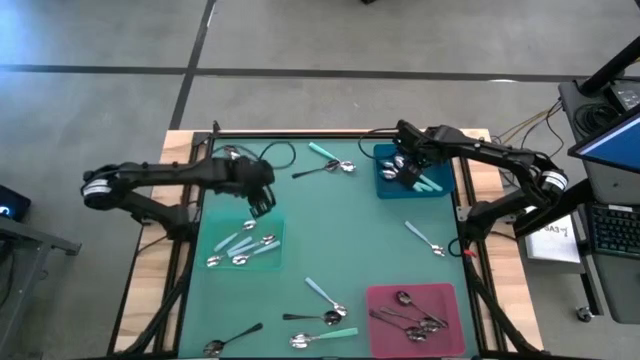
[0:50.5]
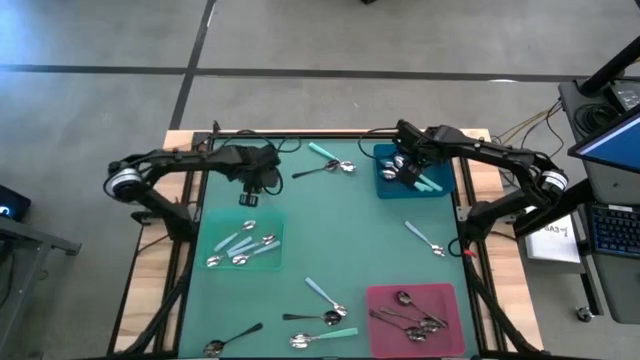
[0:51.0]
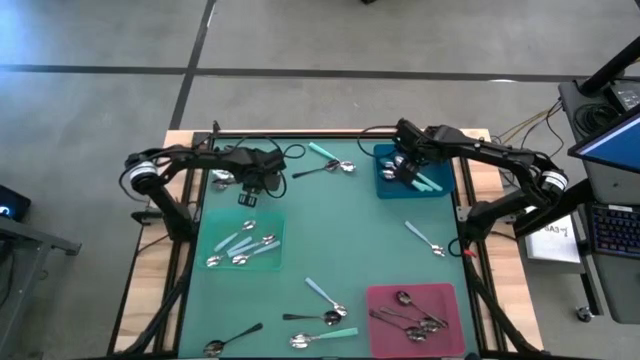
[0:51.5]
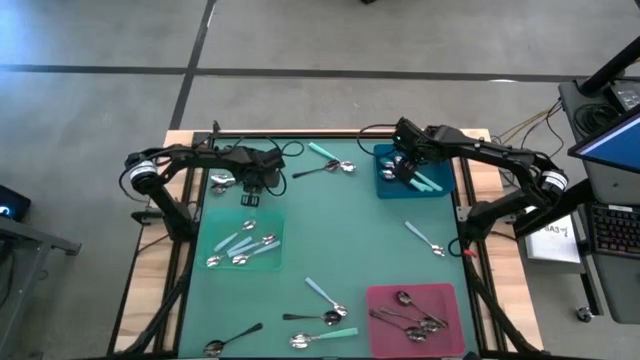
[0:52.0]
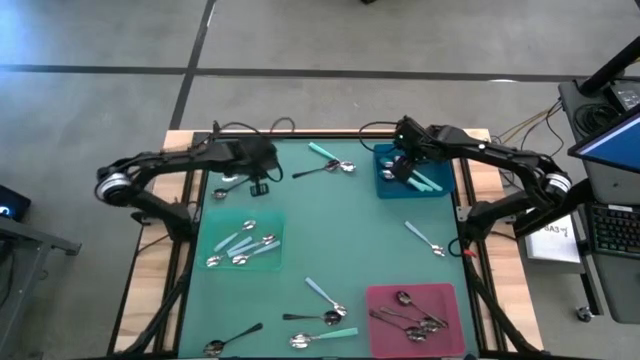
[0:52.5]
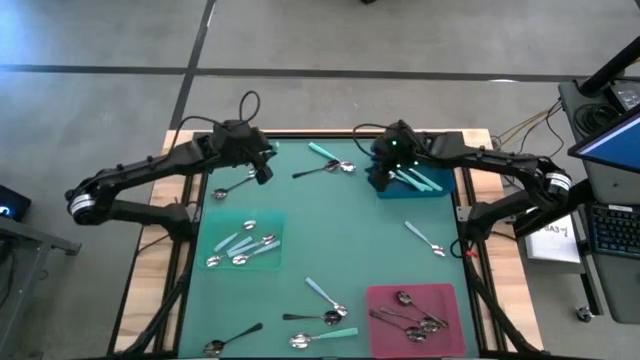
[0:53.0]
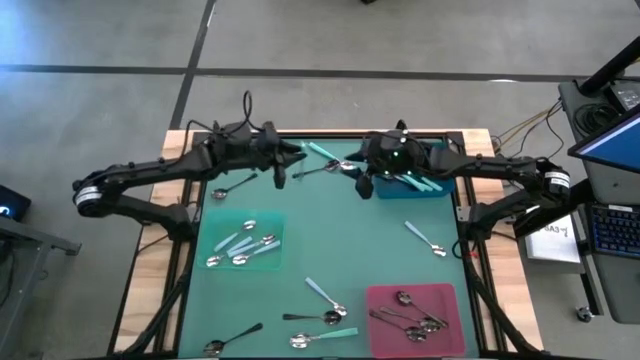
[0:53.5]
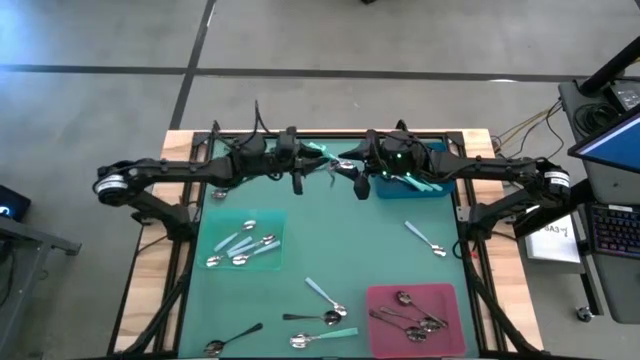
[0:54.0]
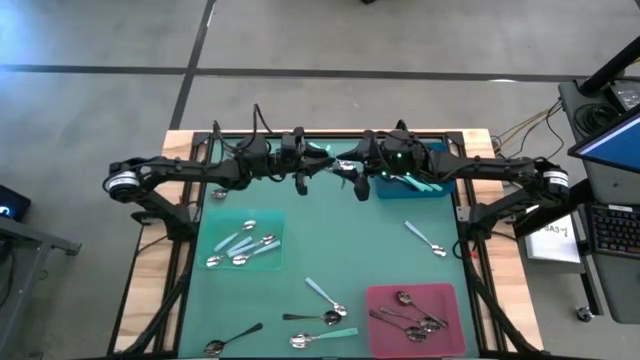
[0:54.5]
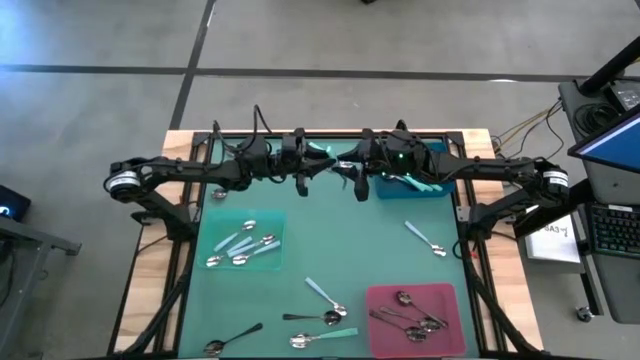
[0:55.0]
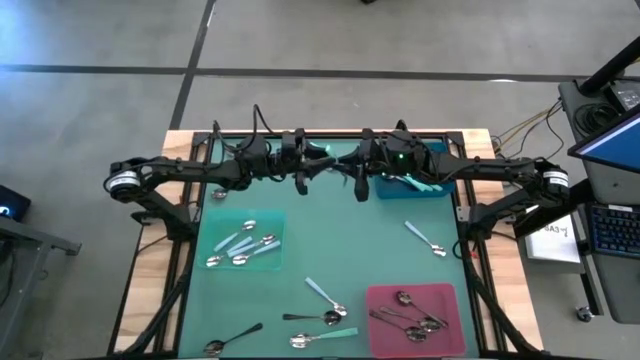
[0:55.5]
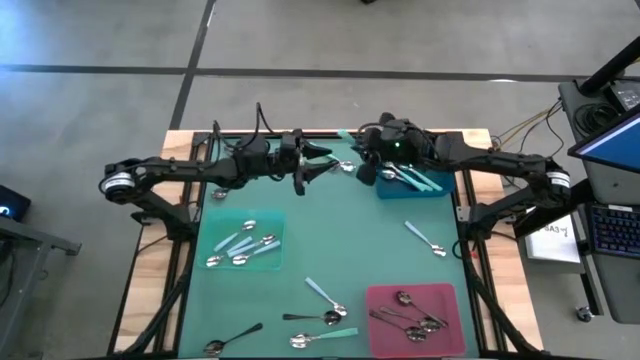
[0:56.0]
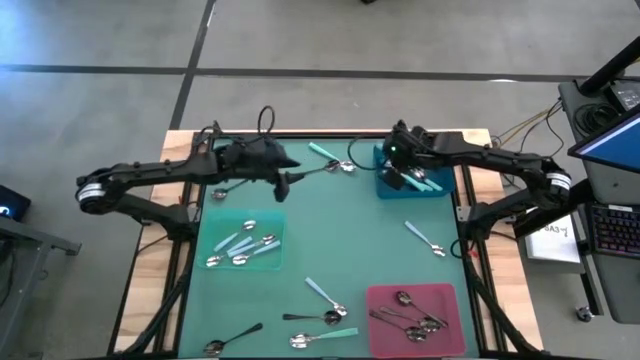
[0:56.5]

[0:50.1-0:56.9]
Task: Sort silverware by color (type)
Put the green spoon into the blue bin

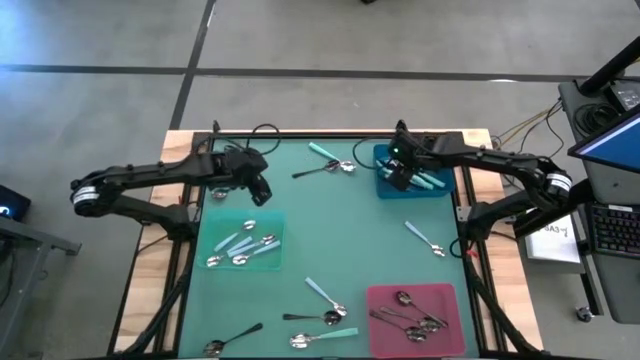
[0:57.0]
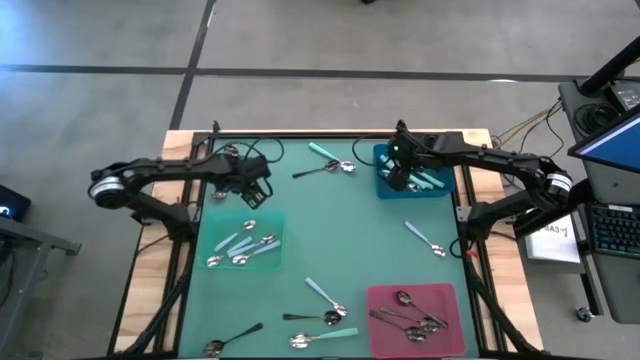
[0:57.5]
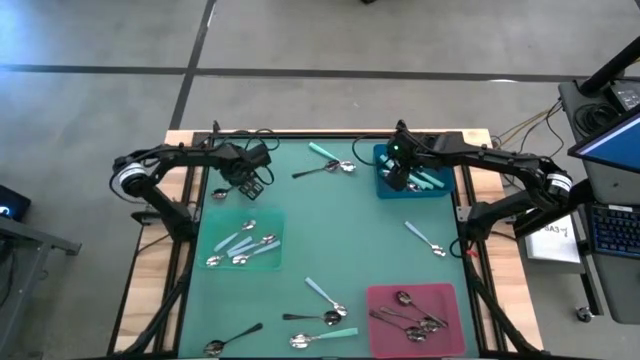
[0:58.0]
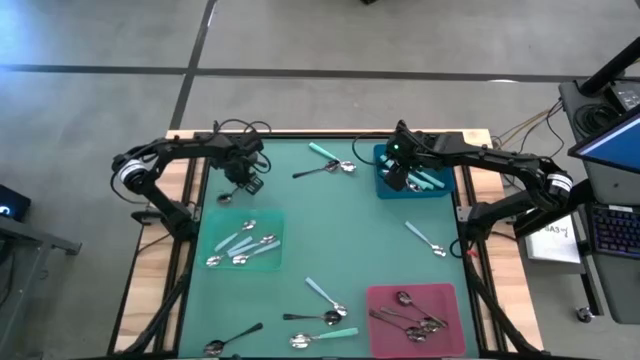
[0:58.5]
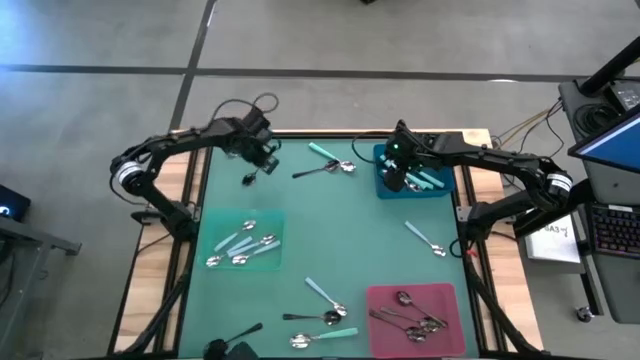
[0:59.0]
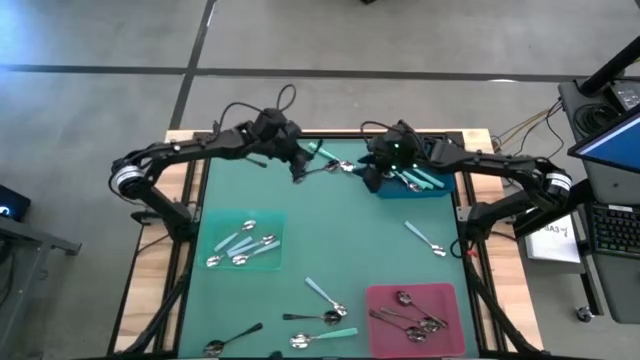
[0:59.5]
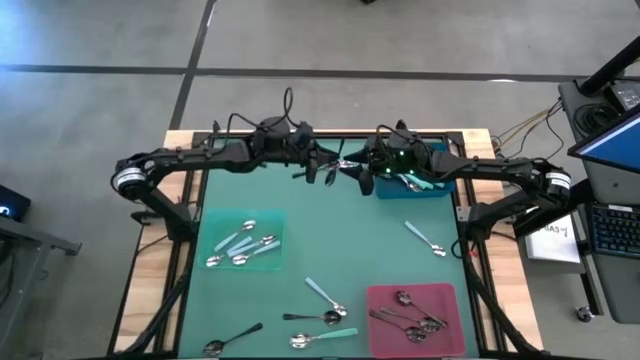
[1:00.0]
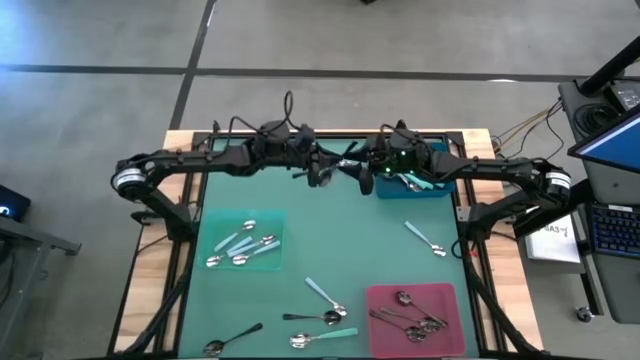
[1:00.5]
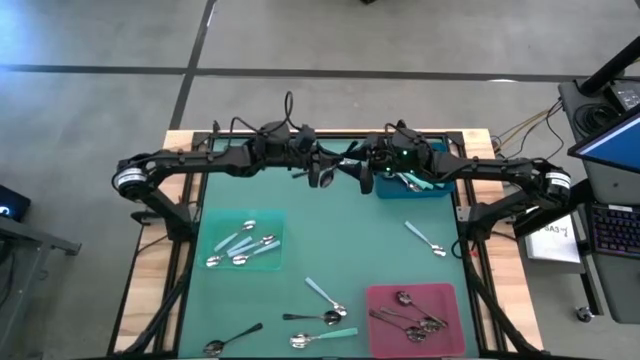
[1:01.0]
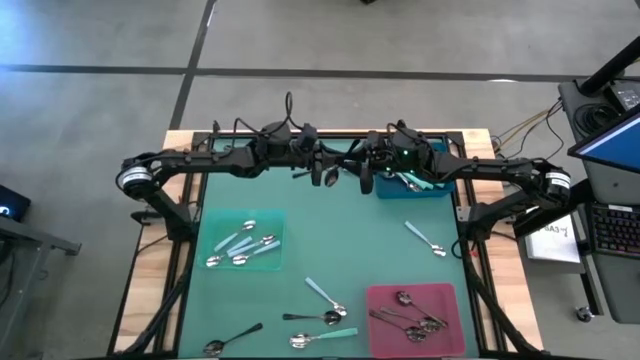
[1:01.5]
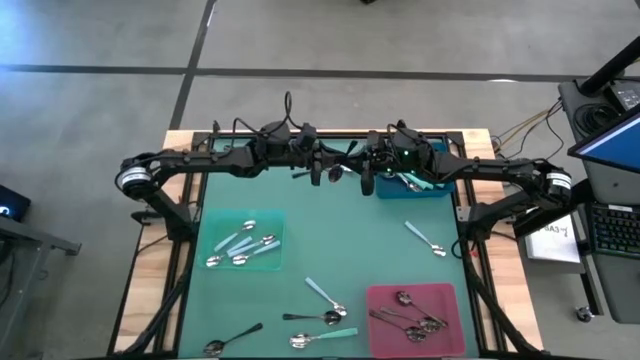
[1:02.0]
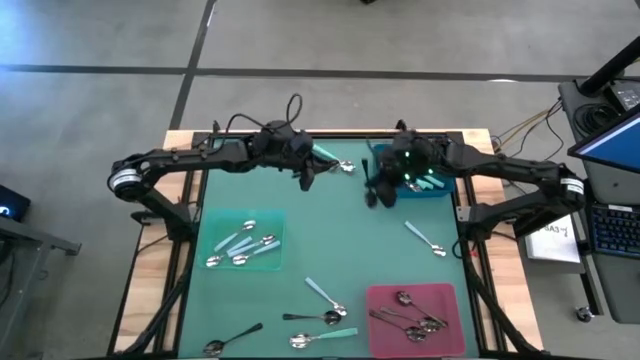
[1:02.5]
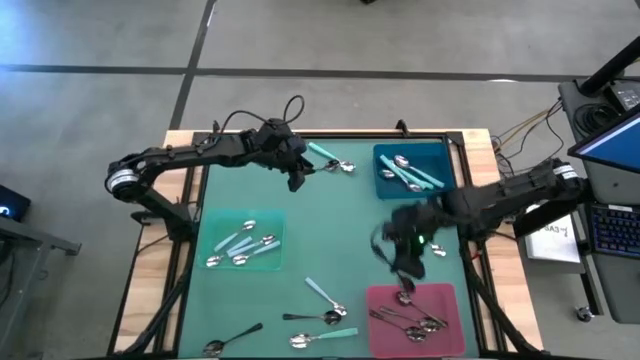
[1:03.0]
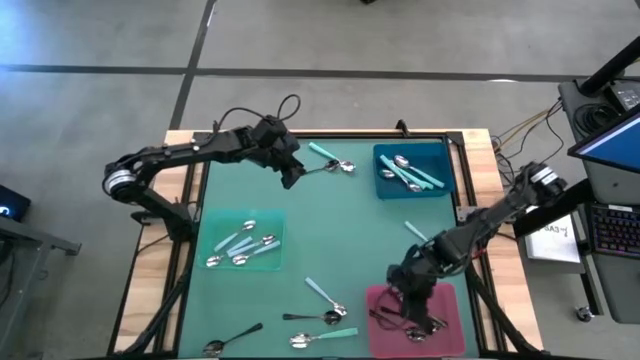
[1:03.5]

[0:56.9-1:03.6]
Put the black spoon into the red bin

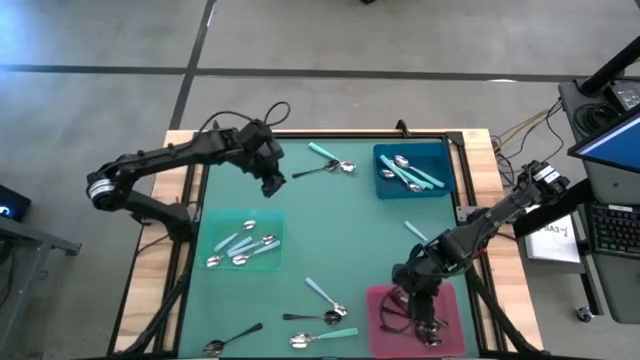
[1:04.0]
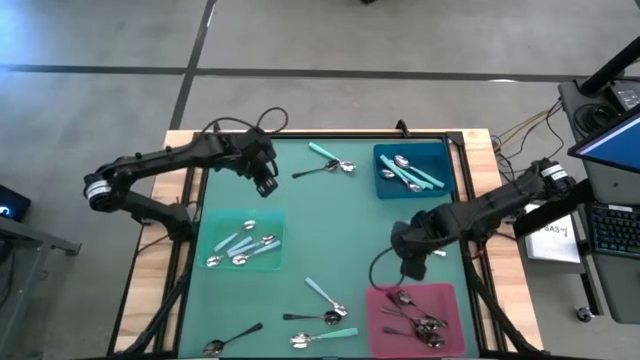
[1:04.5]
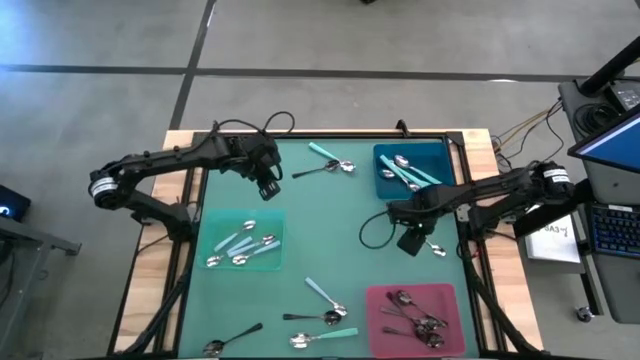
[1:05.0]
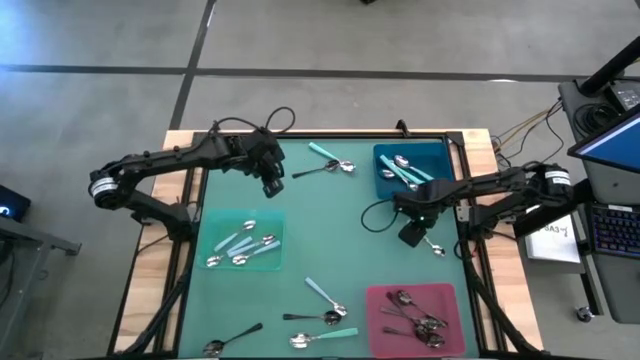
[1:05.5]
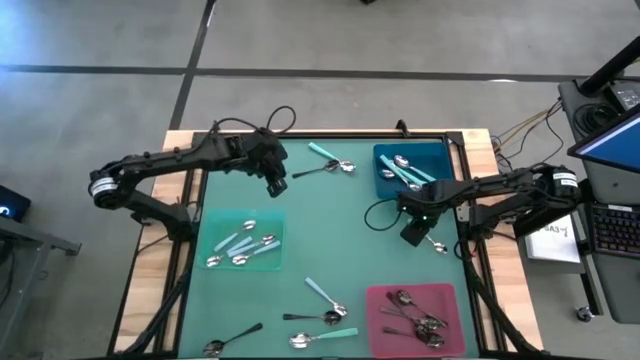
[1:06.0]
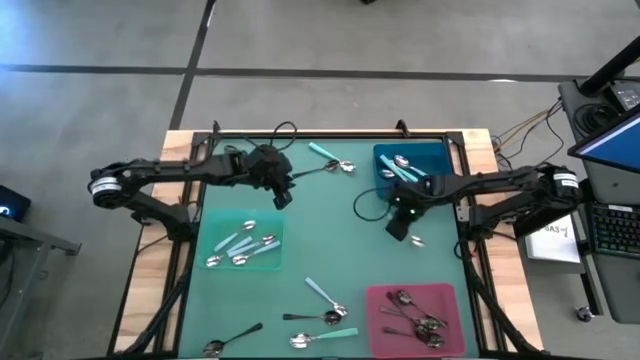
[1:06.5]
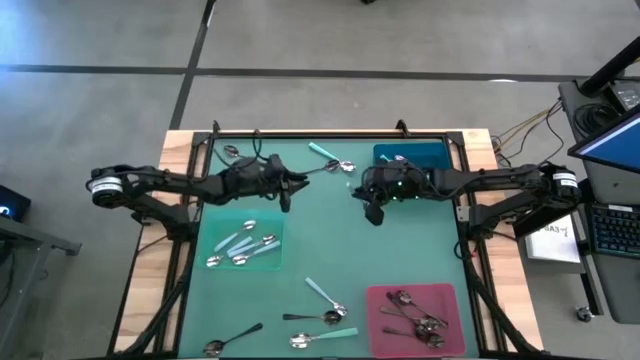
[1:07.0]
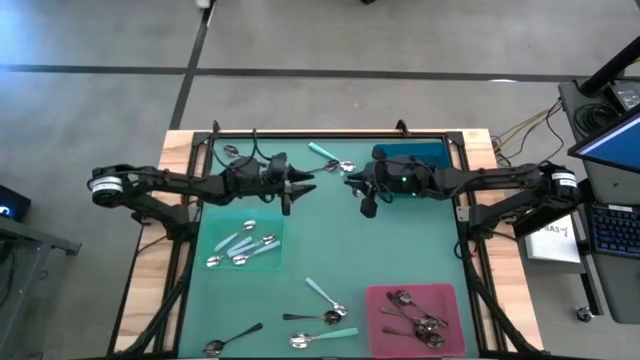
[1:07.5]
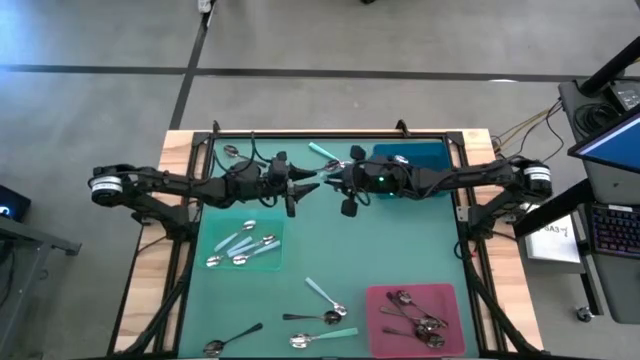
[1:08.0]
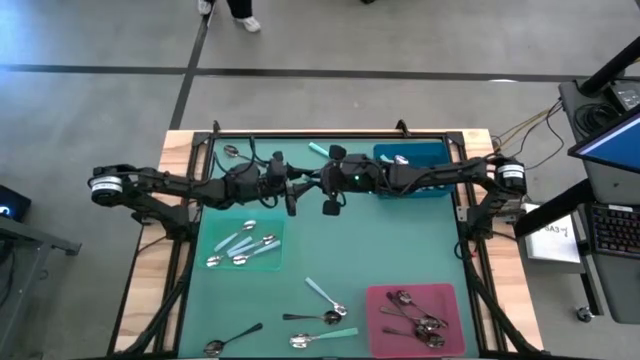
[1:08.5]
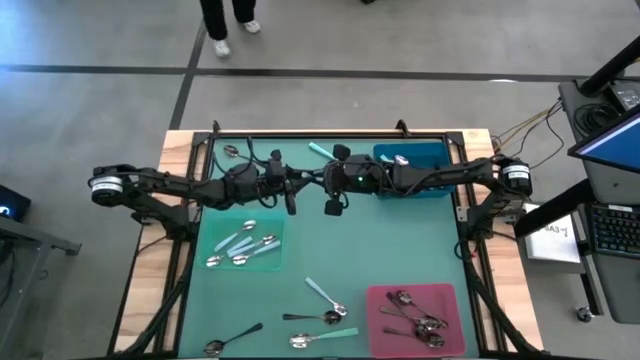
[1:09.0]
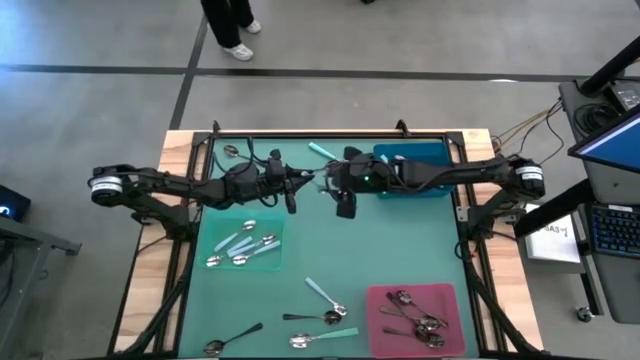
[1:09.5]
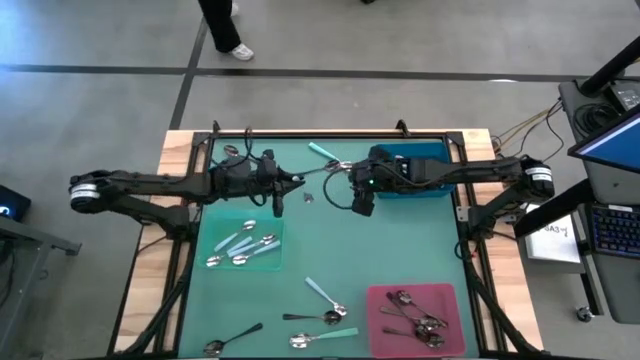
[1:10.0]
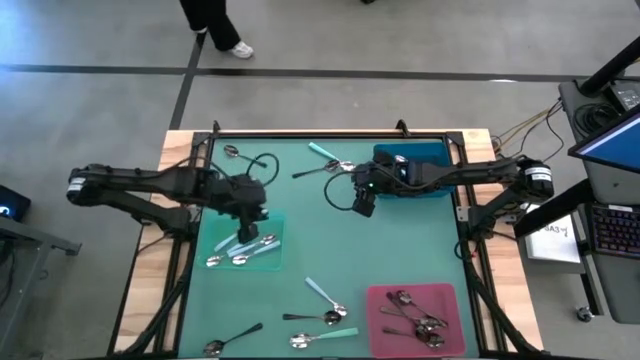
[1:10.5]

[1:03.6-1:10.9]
Put the blue spoon into the green bin
